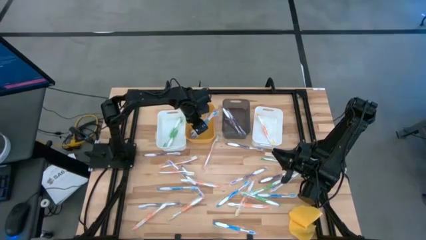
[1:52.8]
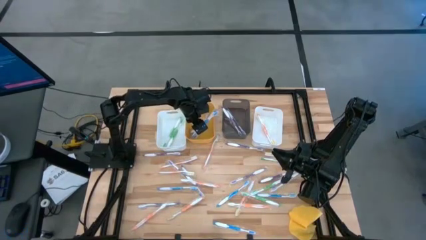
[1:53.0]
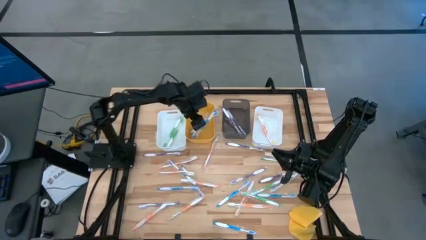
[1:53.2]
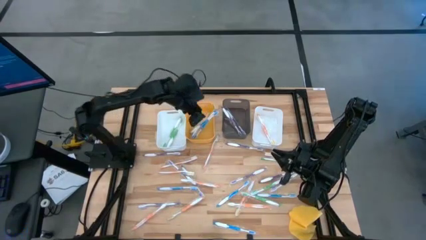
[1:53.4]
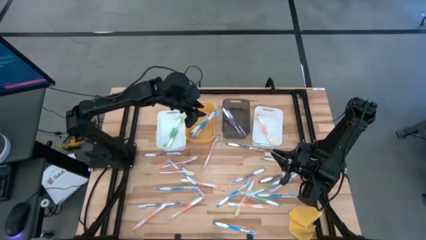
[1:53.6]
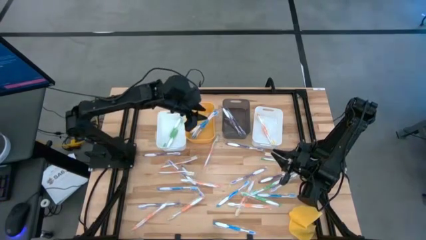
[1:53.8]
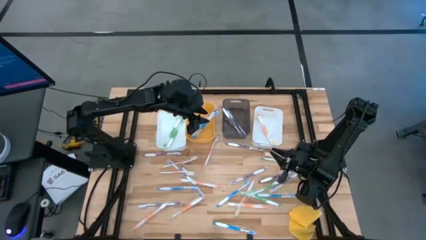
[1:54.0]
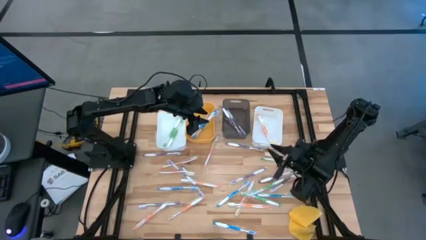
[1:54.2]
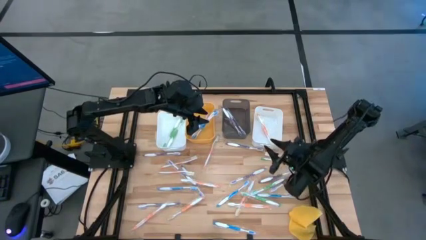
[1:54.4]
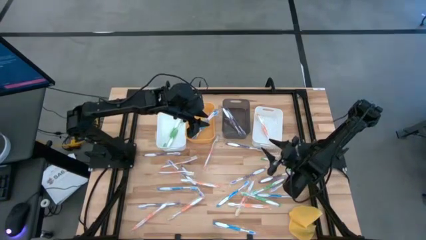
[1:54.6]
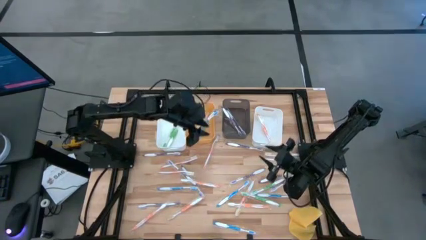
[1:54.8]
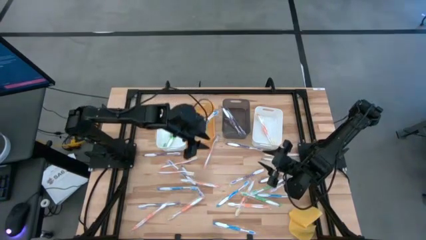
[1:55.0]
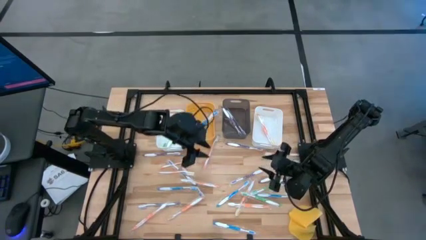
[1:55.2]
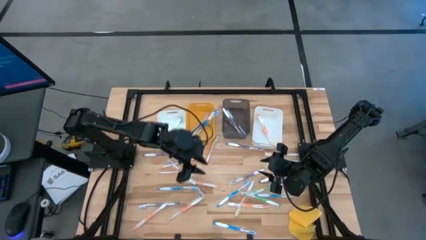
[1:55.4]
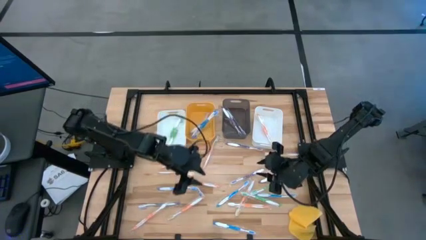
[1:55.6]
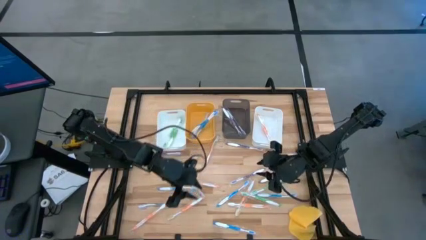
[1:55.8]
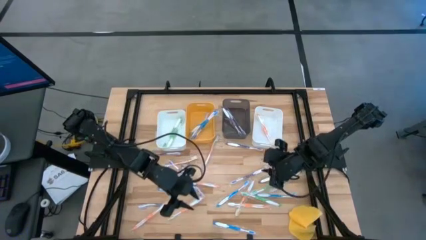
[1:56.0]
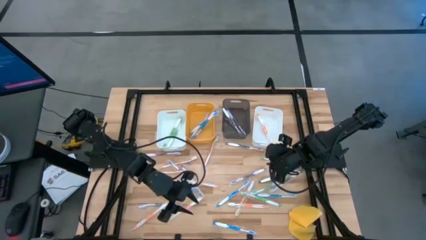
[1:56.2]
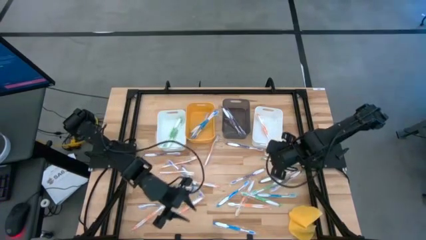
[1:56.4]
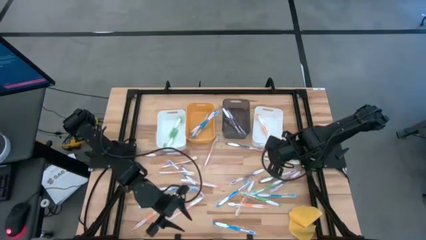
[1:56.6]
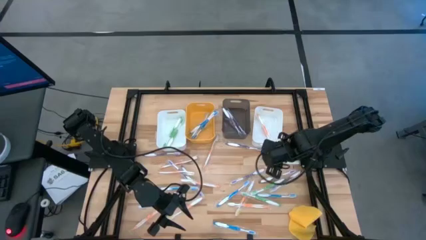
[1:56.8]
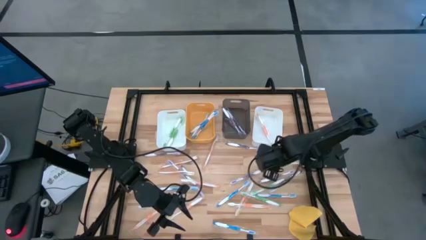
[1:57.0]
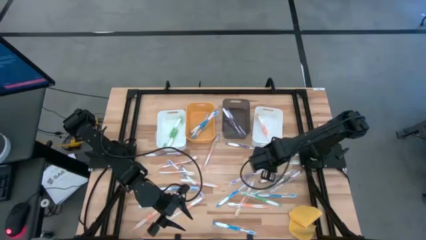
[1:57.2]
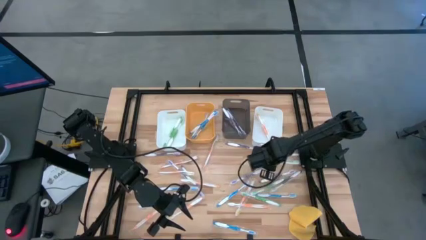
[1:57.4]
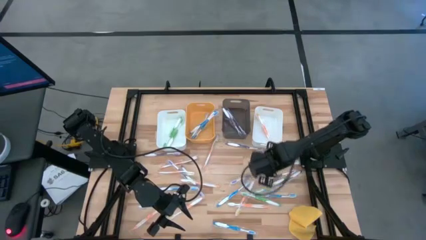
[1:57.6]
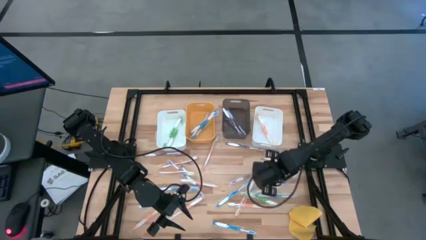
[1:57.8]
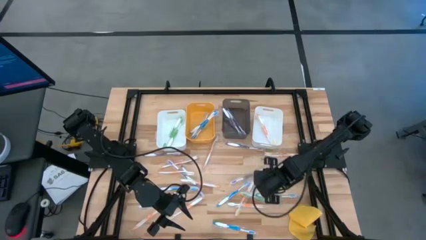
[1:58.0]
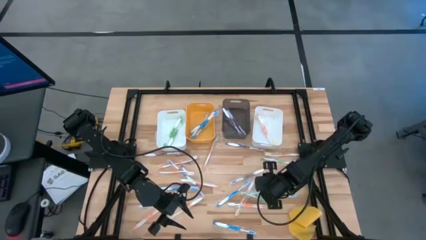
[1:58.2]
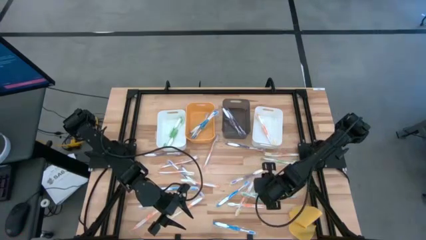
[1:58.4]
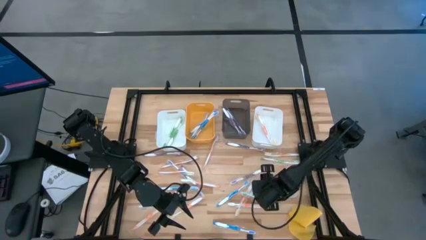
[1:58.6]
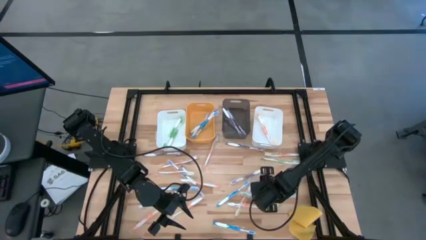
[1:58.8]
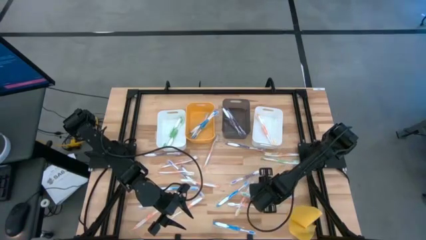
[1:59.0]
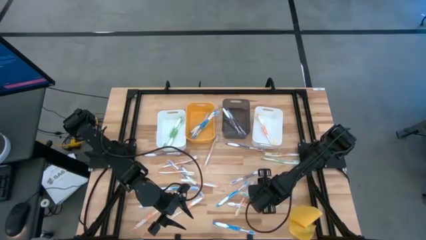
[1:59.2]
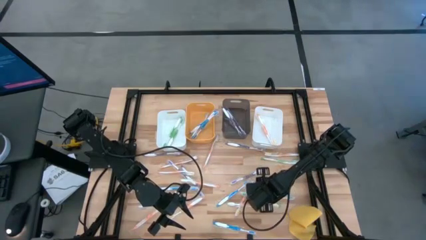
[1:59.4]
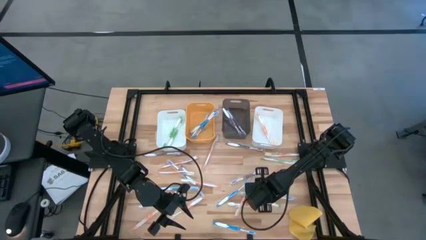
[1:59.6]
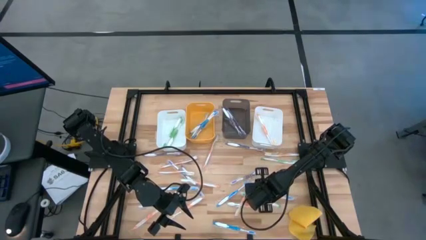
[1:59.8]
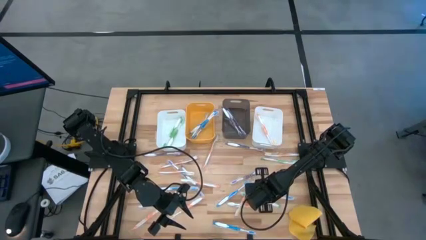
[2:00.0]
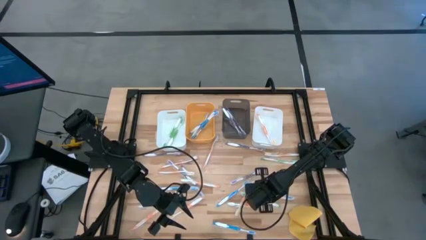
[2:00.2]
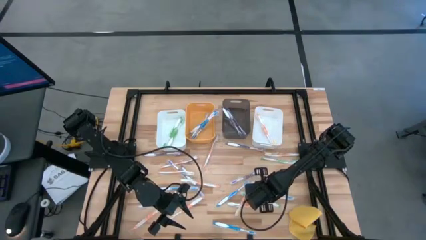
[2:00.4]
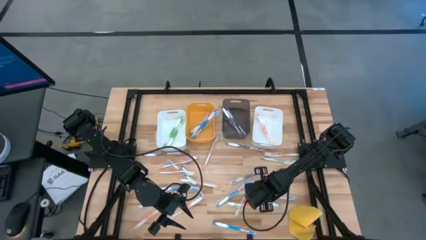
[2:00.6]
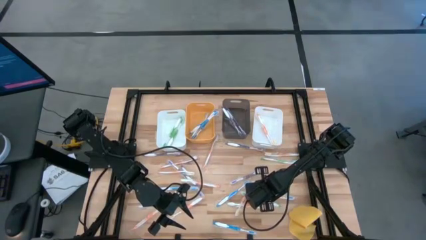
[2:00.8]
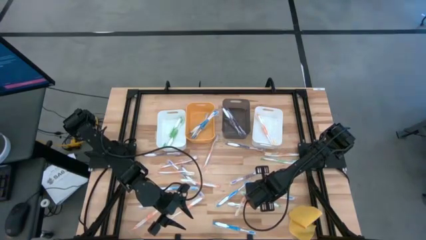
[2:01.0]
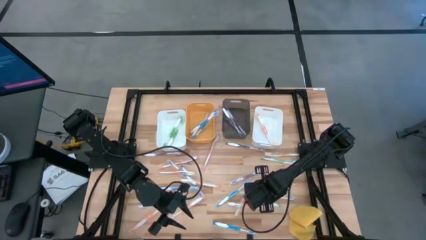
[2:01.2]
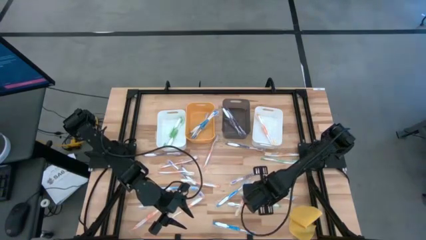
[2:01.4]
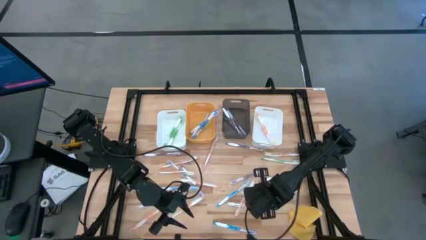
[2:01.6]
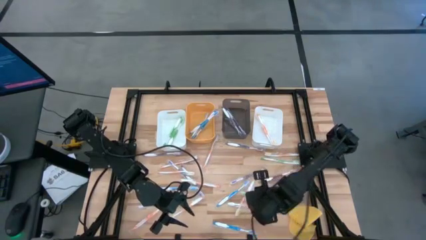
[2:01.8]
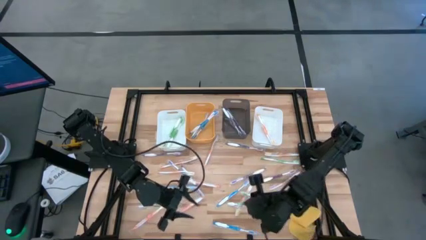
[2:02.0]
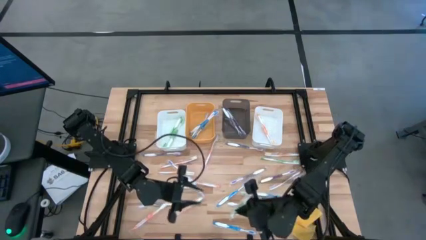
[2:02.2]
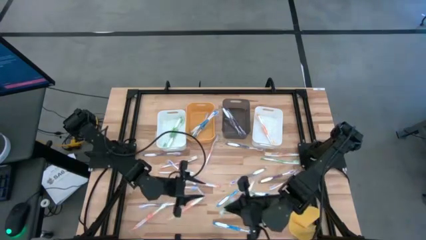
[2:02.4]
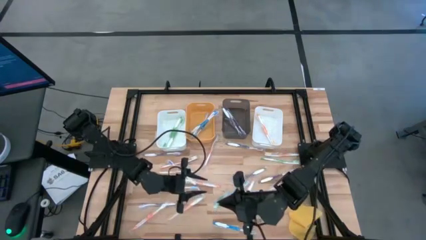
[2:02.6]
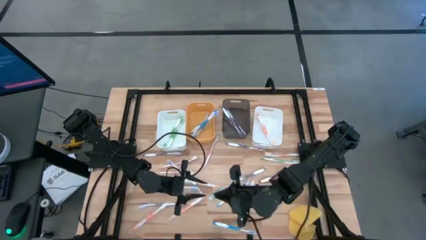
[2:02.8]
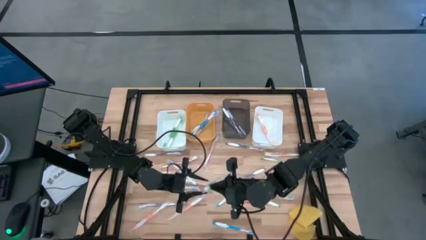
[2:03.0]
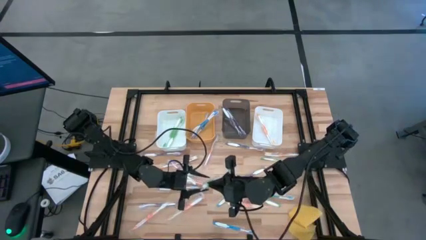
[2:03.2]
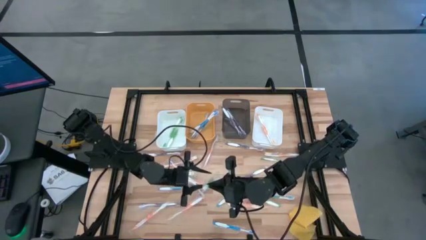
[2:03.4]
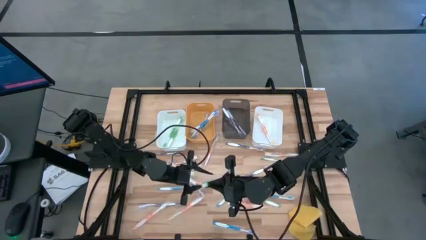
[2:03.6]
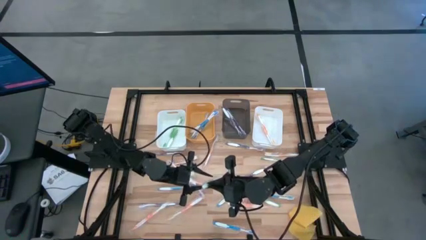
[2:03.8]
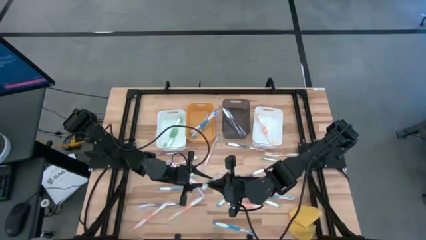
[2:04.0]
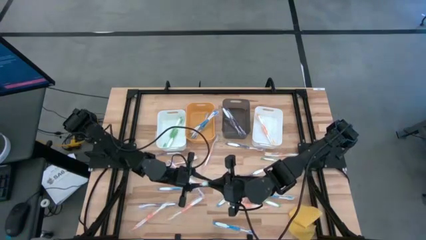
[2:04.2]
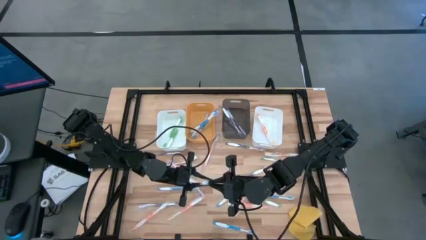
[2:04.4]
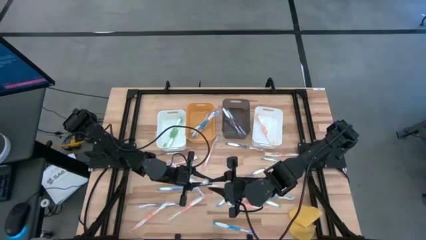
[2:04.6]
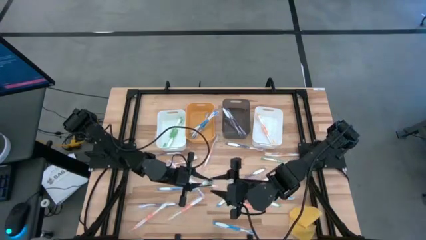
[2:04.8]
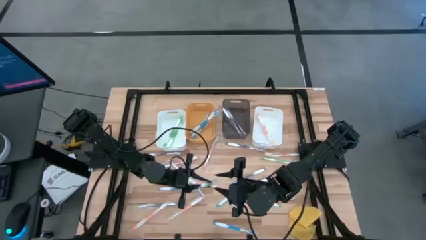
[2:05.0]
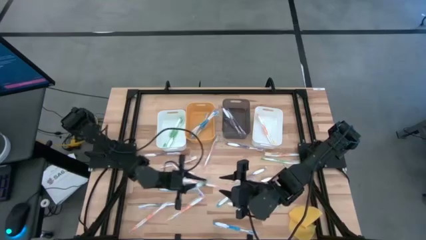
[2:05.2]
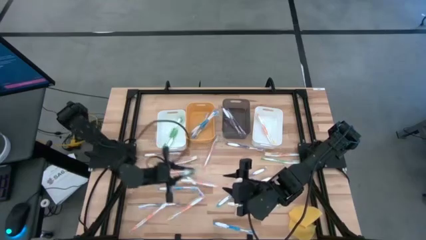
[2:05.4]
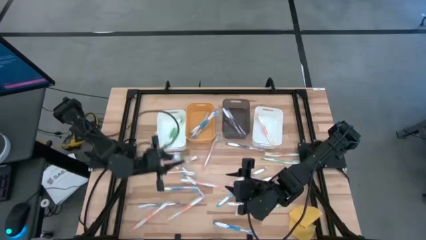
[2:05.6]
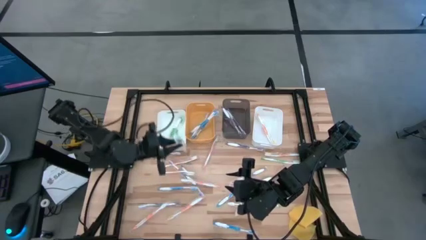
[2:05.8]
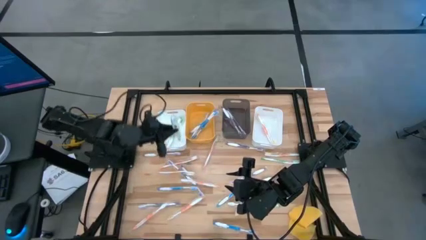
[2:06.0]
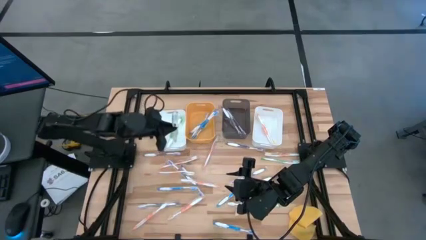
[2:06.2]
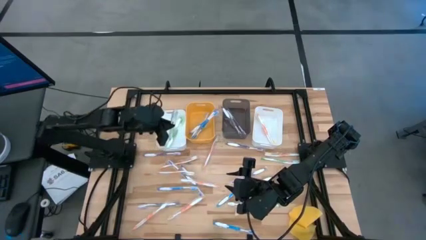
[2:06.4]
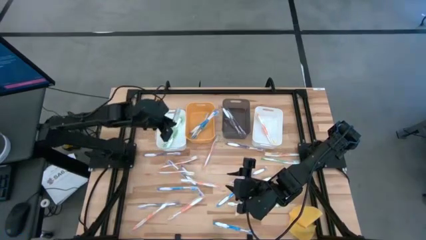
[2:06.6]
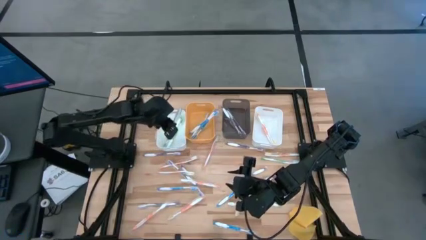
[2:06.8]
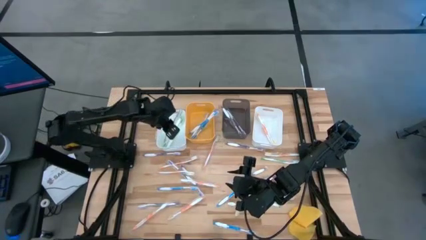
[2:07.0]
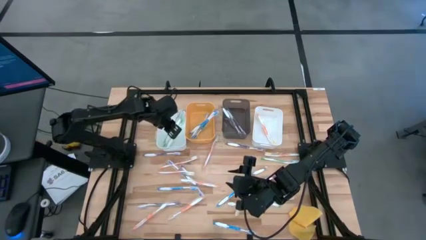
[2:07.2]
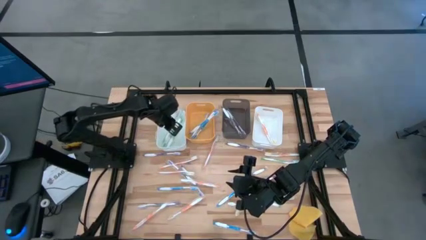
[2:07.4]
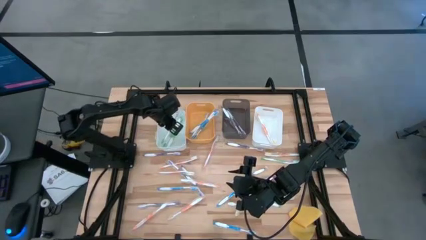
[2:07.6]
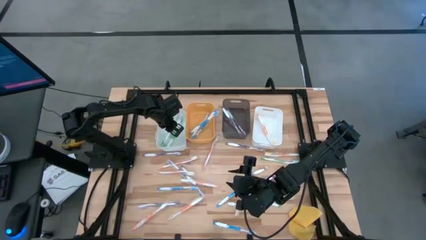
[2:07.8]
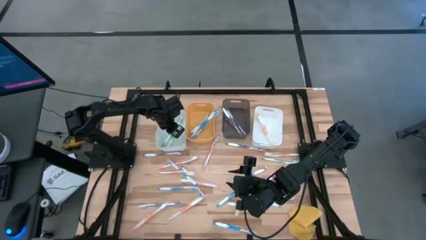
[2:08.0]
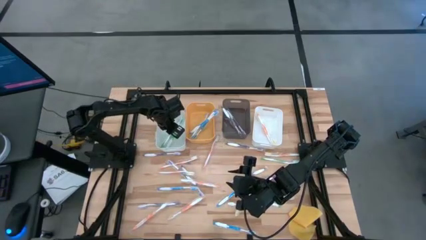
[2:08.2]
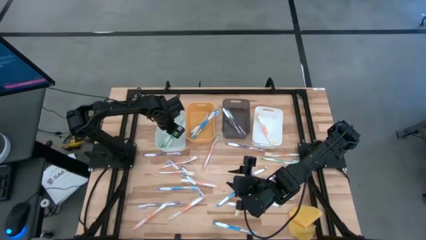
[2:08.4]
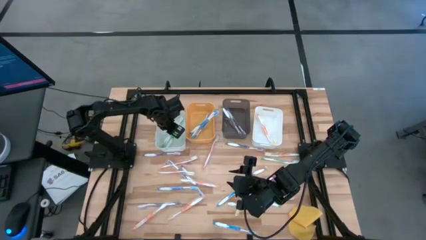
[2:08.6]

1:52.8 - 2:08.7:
Task: Pick & Place Toothbrushes
Put the middle green toothbrush into the left white bin
